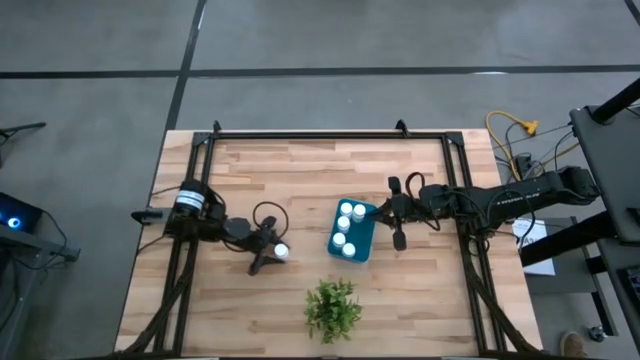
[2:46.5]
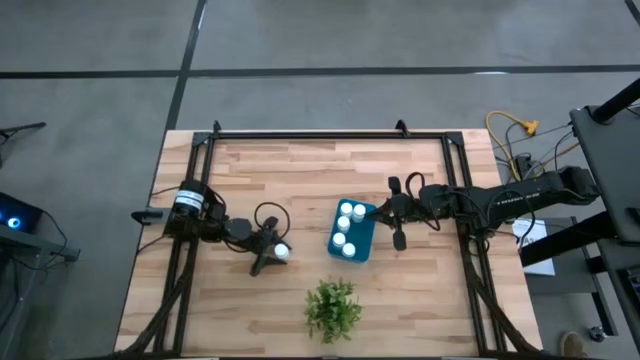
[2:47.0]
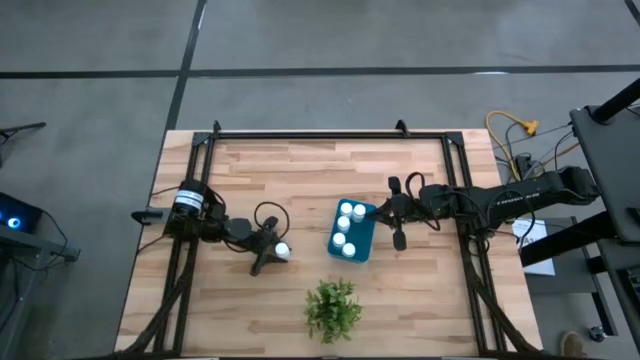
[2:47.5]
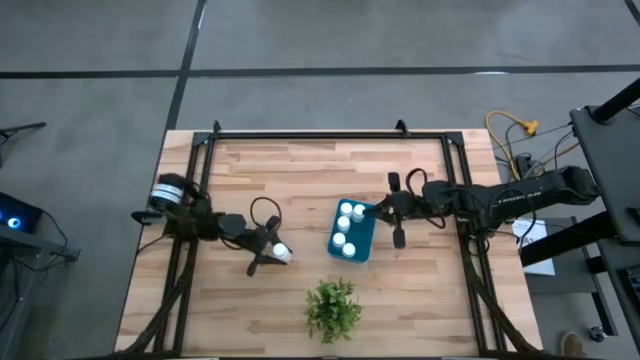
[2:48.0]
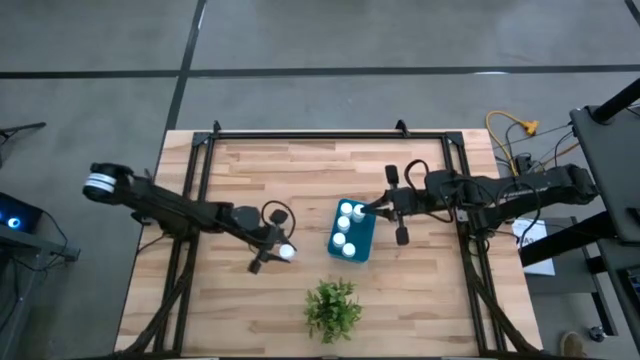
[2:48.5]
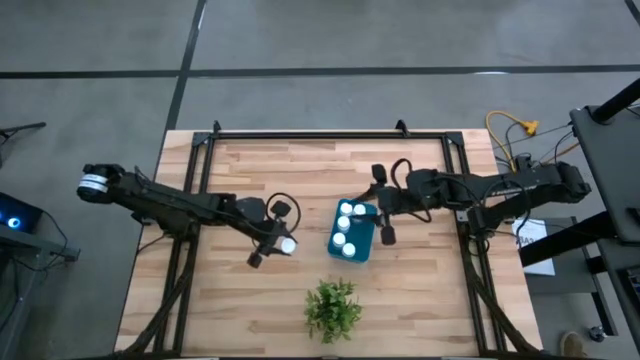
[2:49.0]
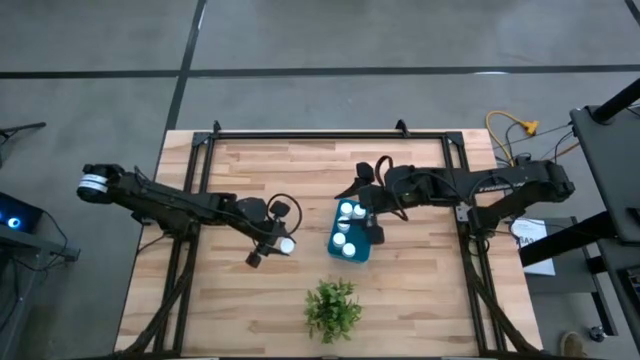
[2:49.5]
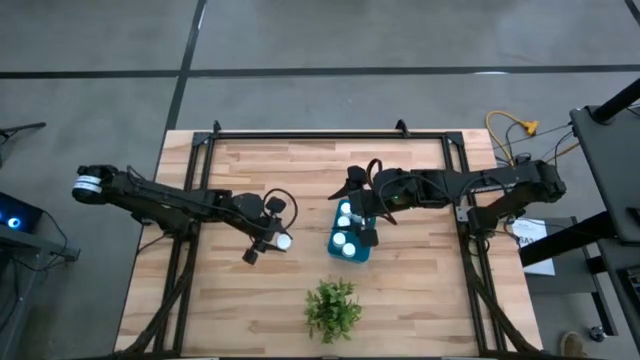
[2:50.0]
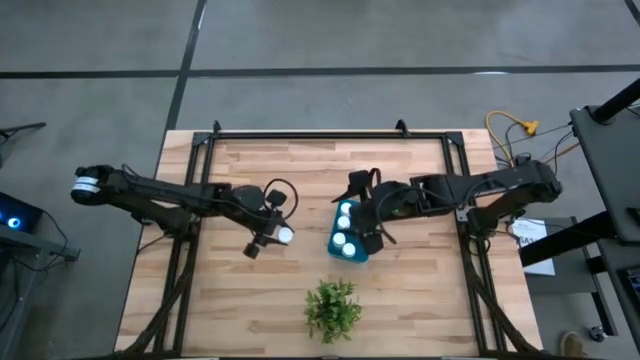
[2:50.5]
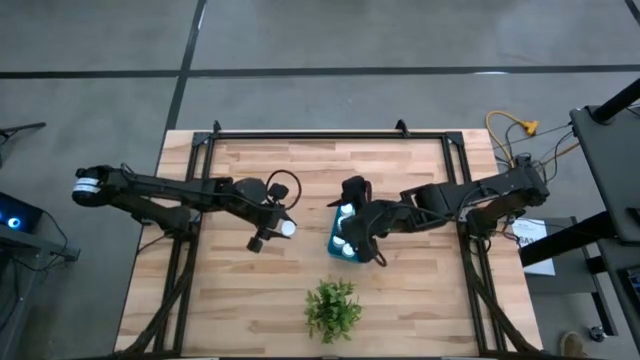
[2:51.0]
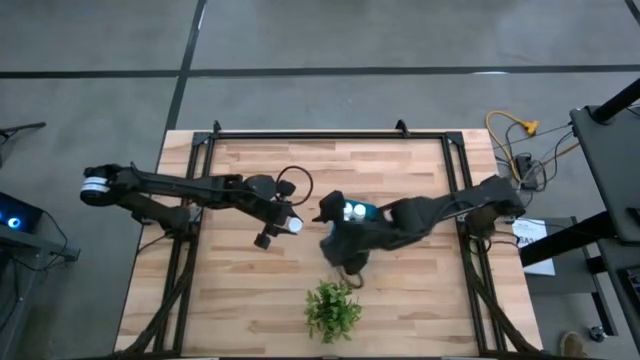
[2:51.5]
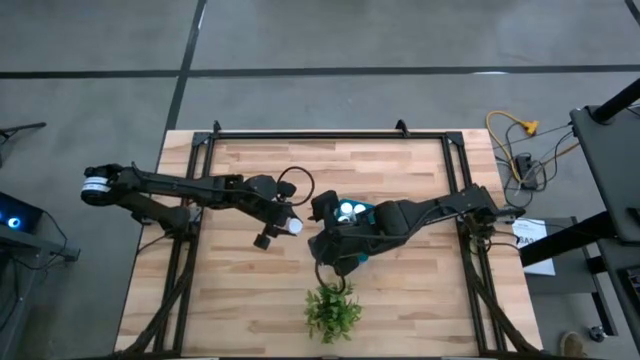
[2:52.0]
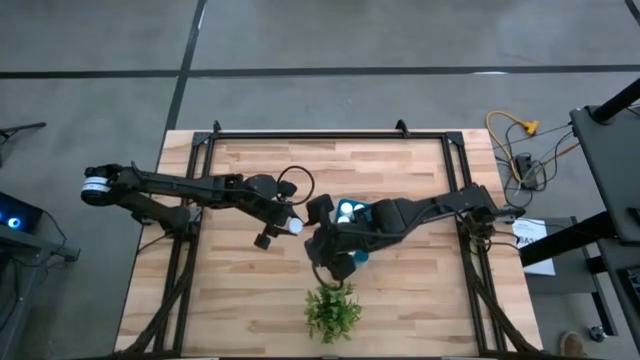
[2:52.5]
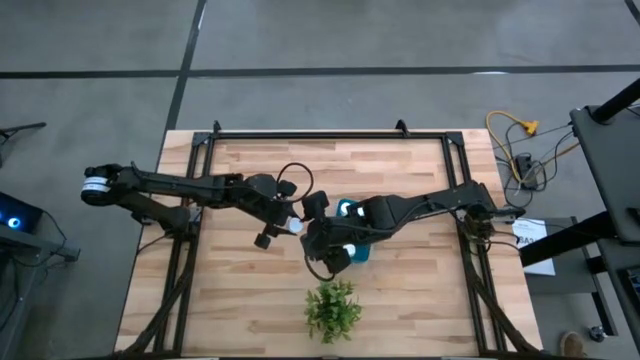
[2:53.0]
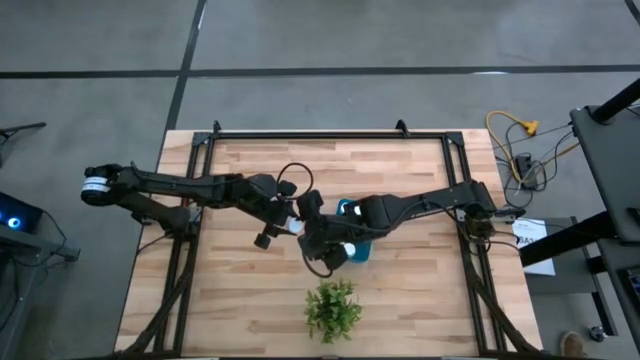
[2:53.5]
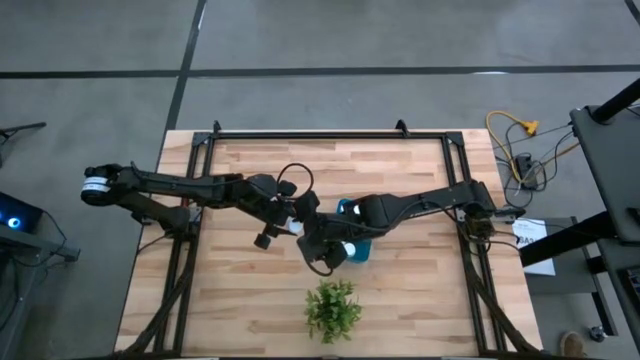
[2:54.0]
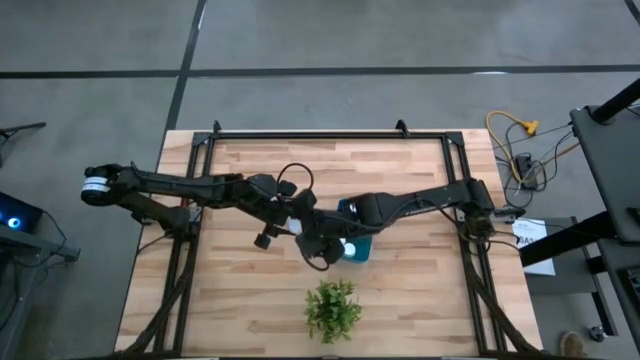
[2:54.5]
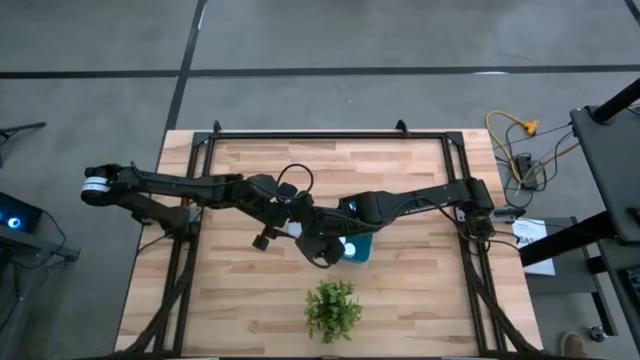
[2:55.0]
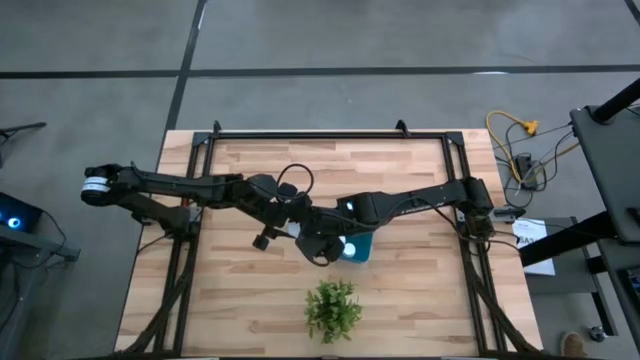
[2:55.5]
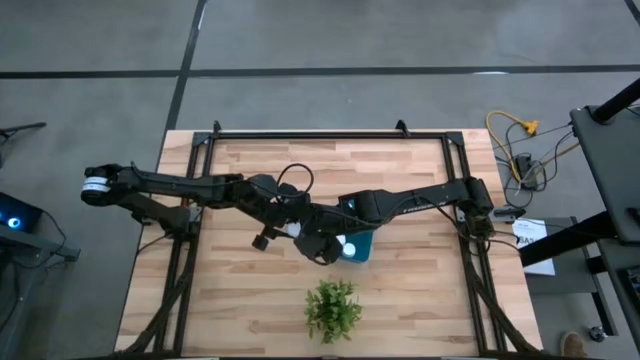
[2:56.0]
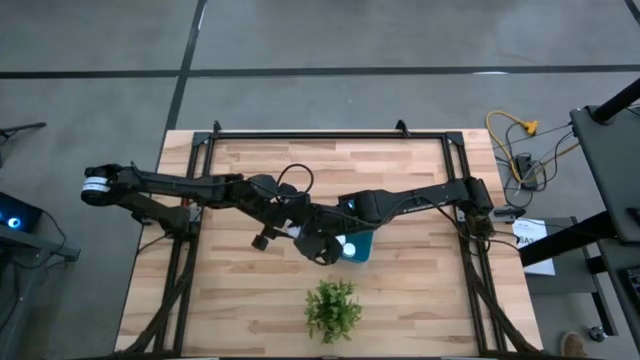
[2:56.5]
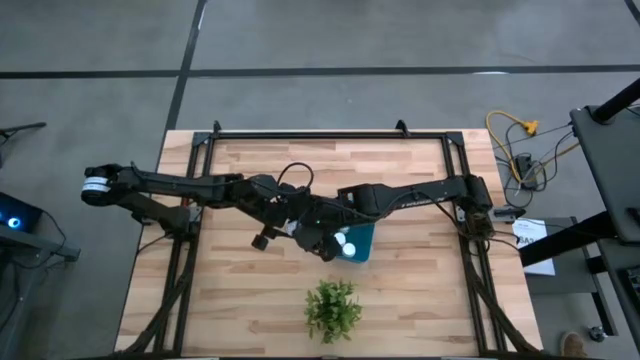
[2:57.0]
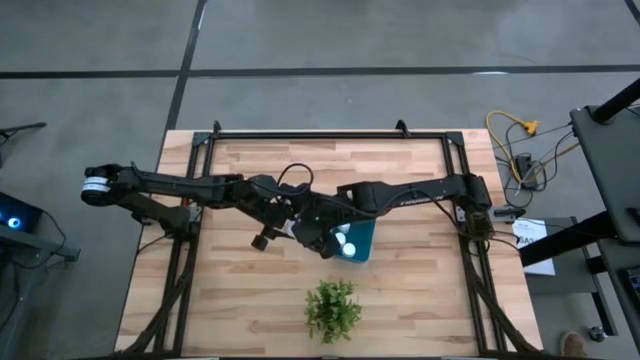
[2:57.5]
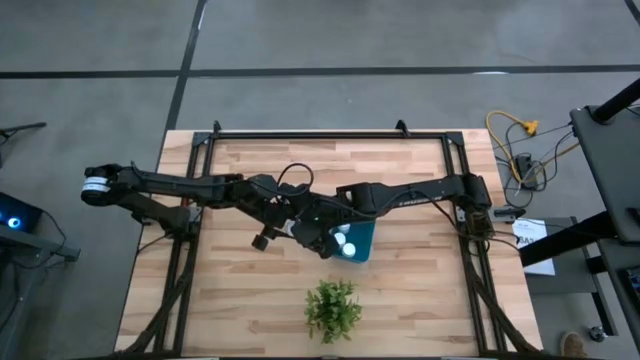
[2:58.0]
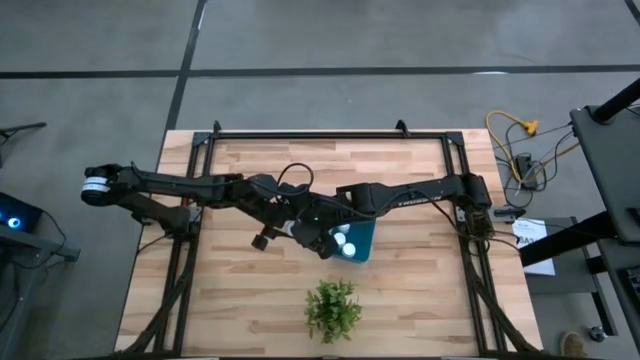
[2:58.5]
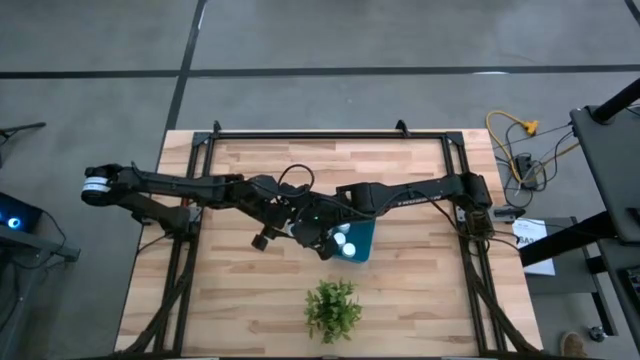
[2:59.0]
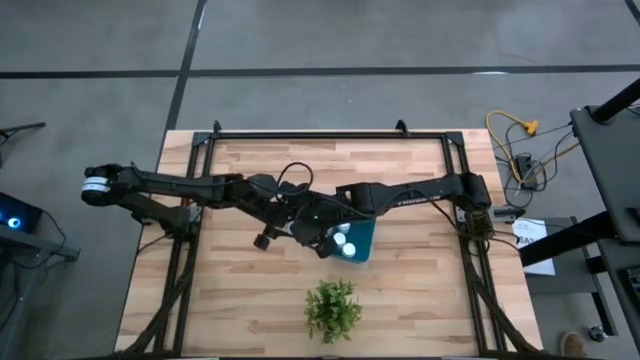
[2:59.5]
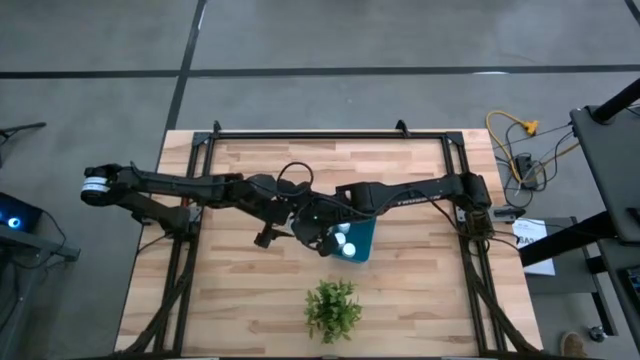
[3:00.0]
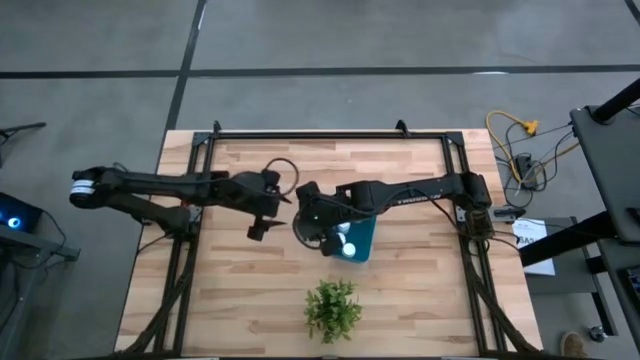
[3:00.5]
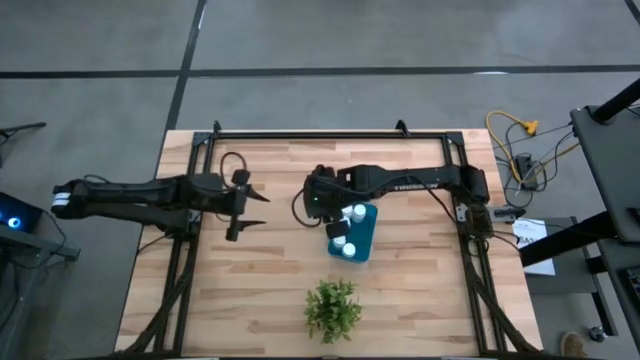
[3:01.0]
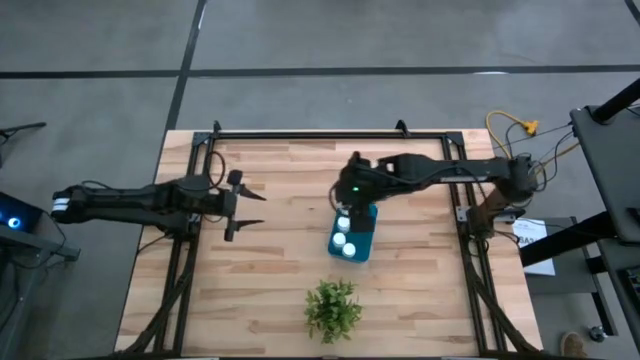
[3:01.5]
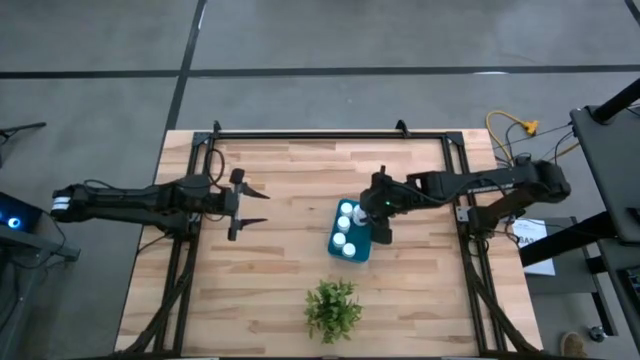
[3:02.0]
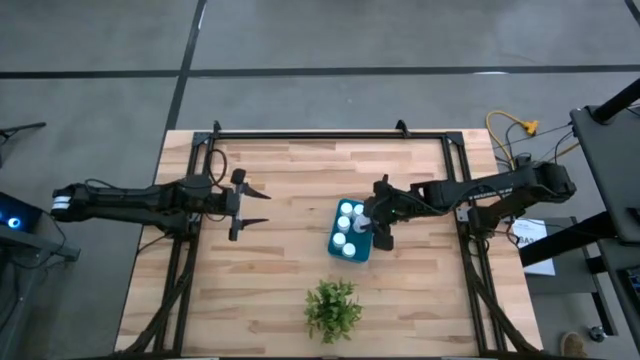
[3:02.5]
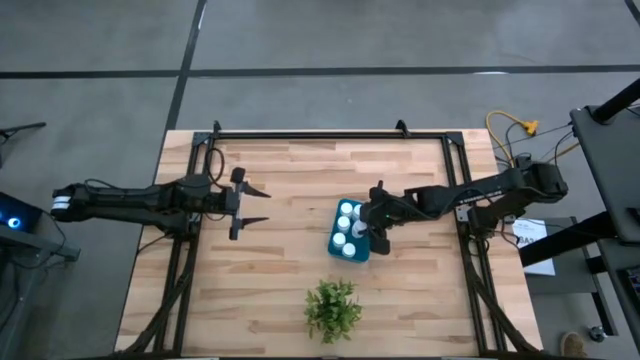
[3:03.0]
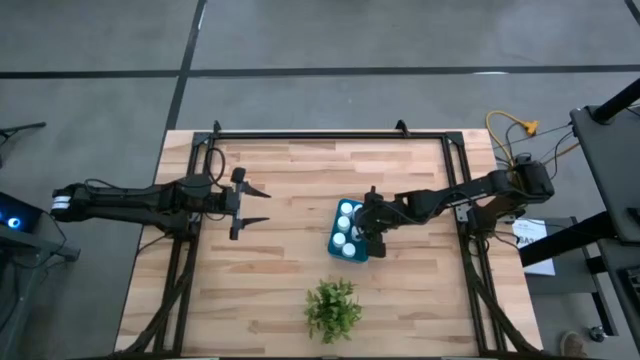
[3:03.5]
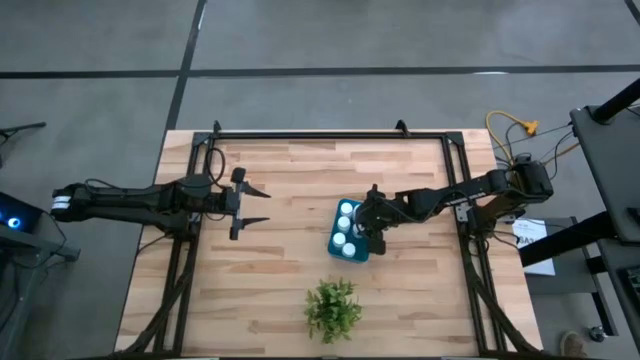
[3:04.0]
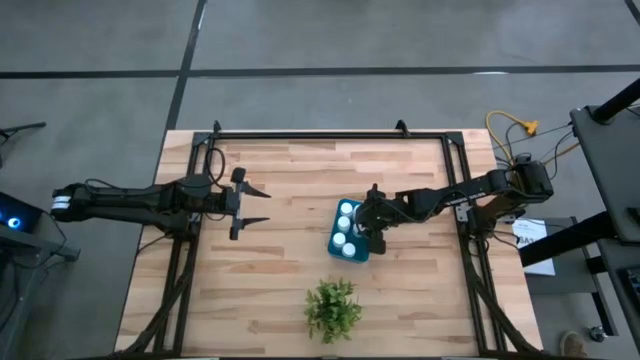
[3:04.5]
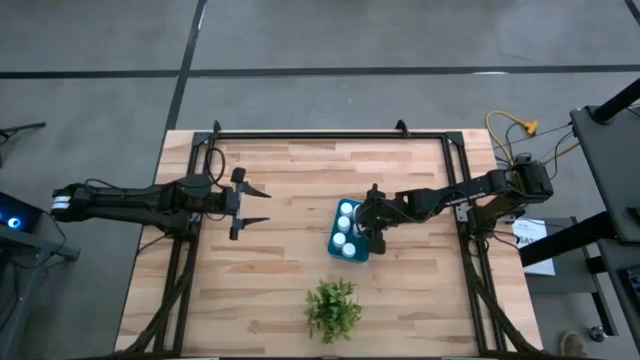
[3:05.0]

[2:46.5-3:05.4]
Task: Pick and place pill bottles into a basket
Put the white pill bottle into the blue bin

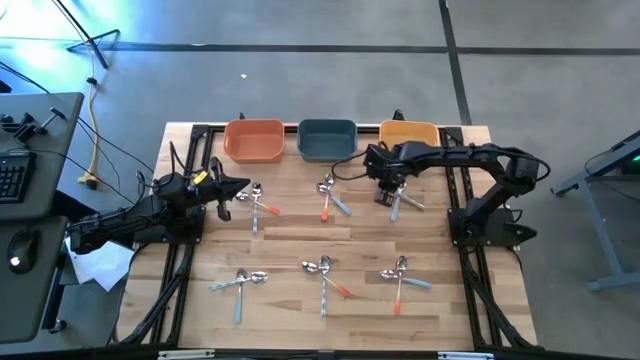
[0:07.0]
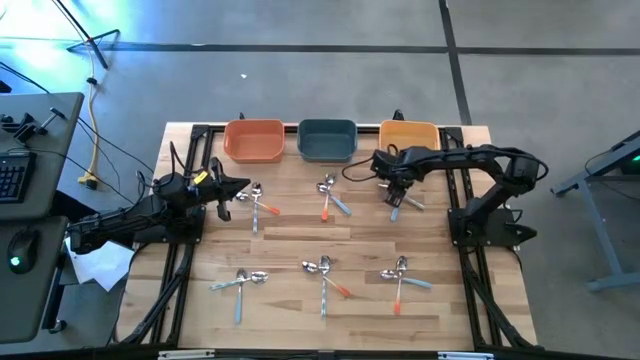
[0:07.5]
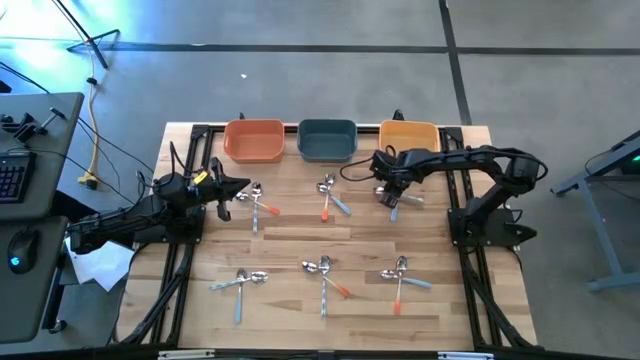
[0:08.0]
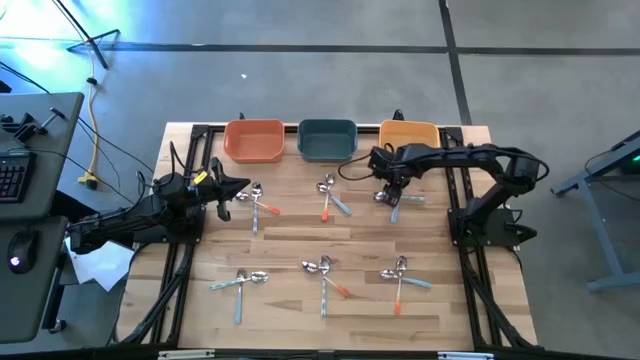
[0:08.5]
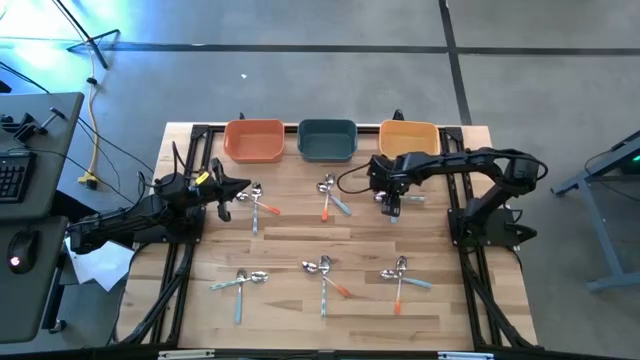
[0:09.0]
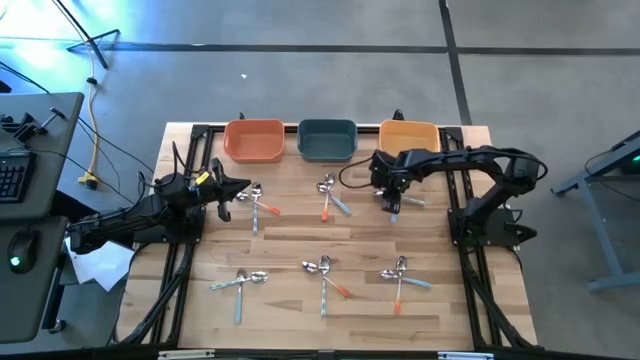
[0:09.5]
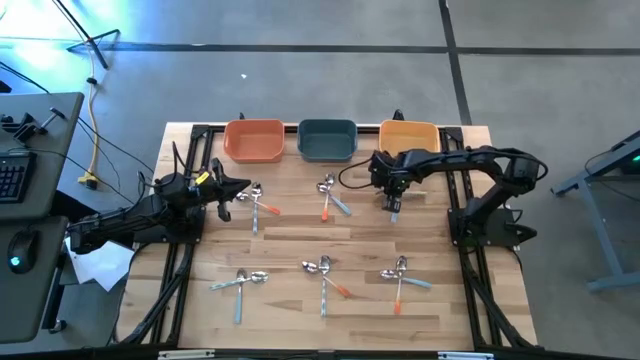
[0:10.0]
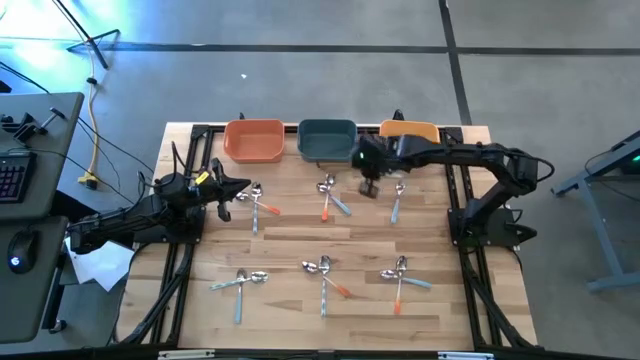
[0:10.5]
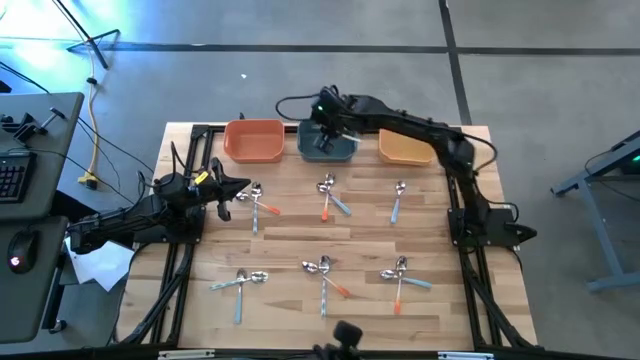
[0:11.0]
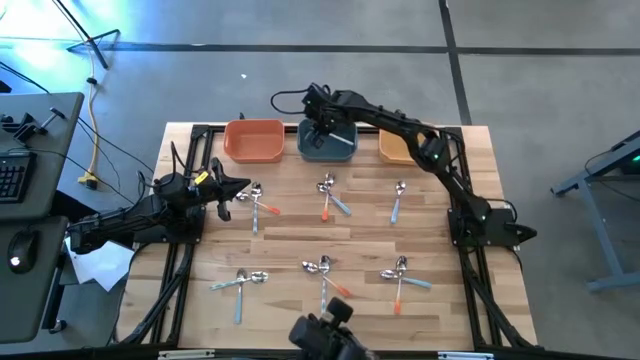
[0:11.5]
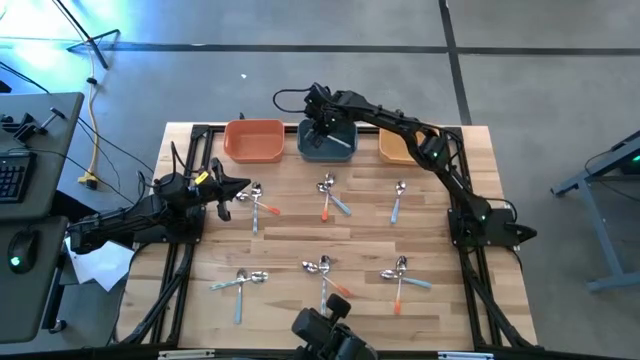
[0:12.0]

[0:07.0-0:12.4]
Task: Sort silverware by color (type)
Put the white spoon into the blue bin
